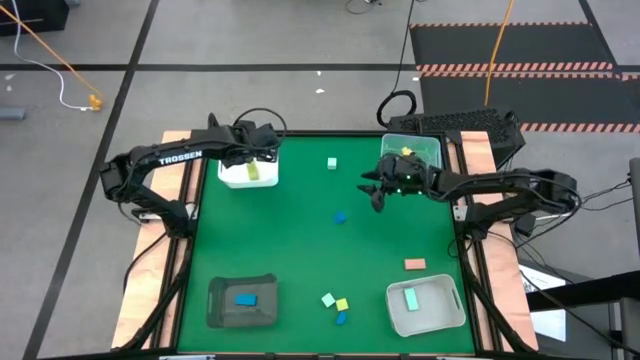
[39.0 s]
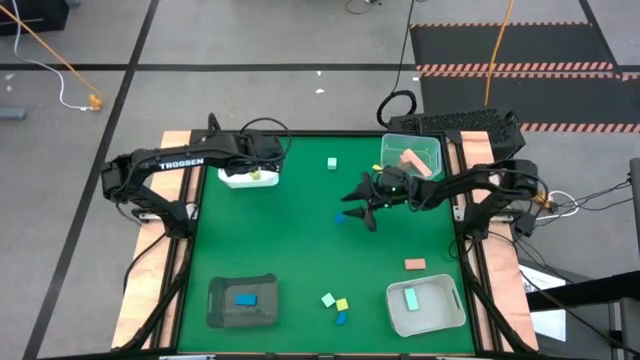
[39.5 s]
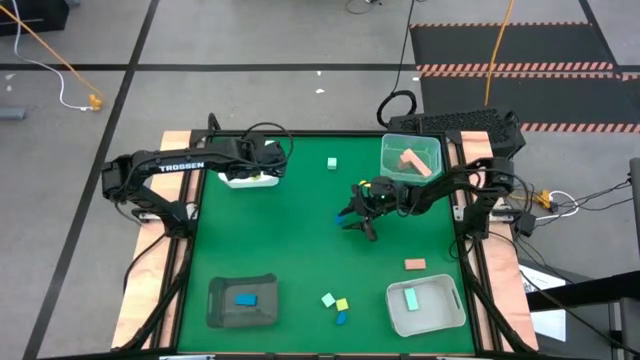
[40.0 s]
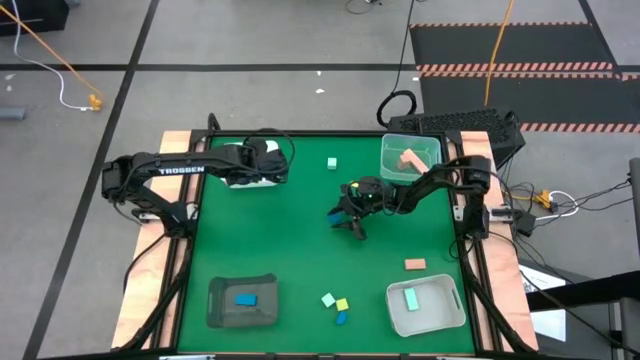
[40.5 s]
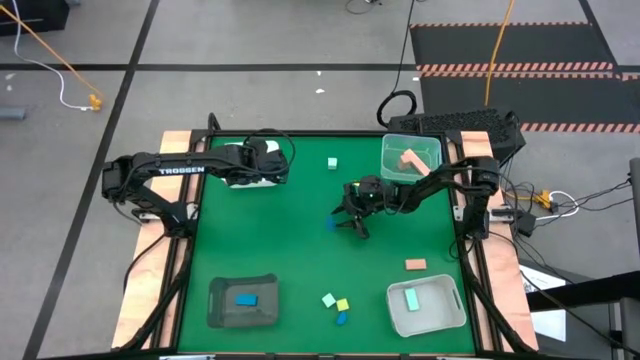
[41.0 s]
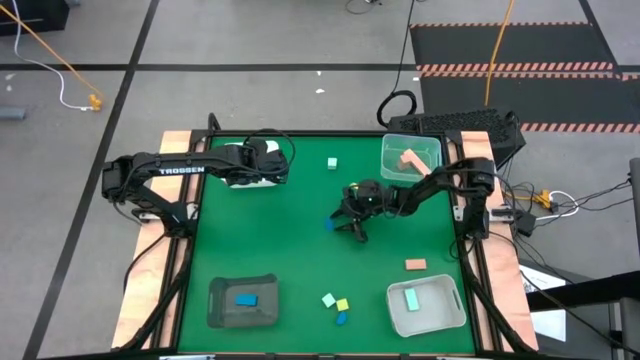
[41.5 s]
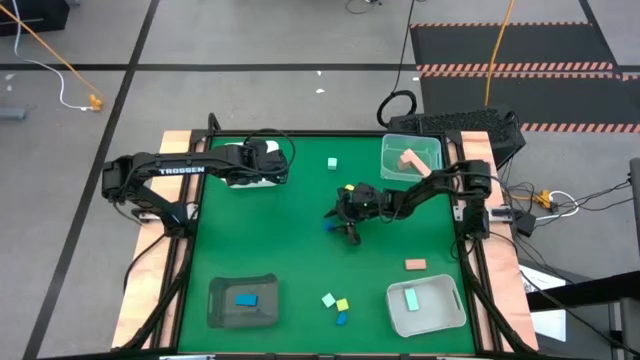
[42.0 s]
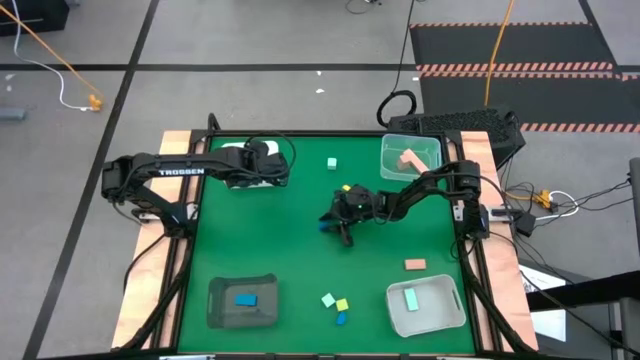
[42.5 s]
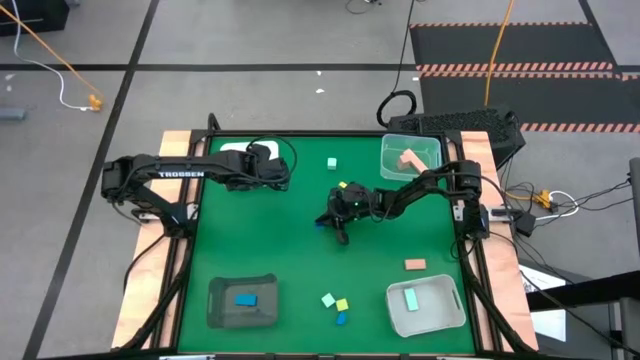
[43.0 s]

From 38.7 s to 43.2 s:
Task: Sort & place blocks by color
Put the top blue block into the black bin

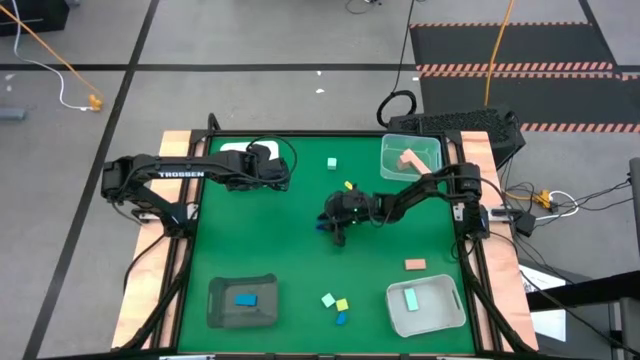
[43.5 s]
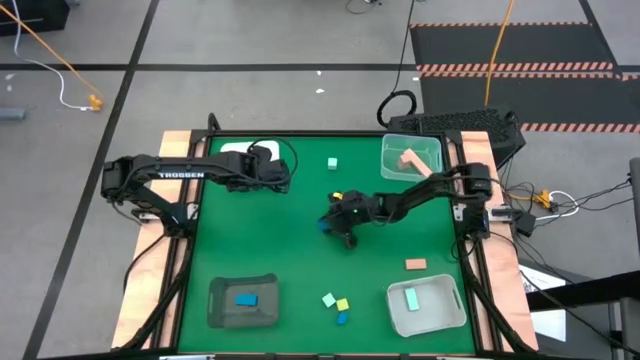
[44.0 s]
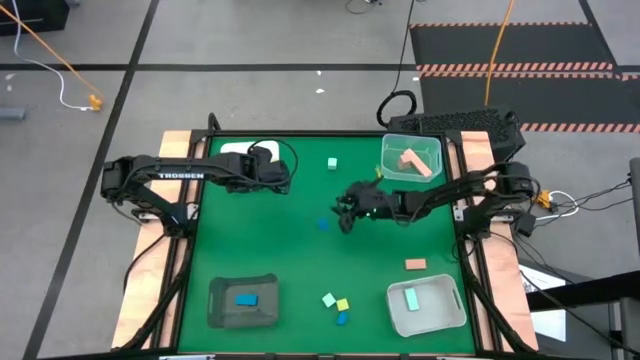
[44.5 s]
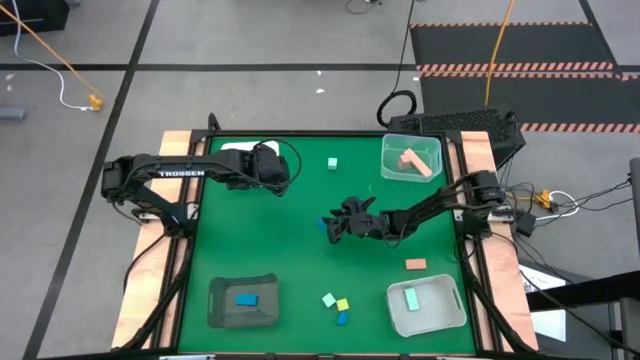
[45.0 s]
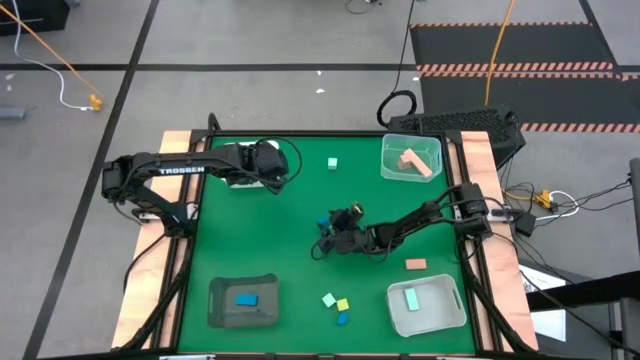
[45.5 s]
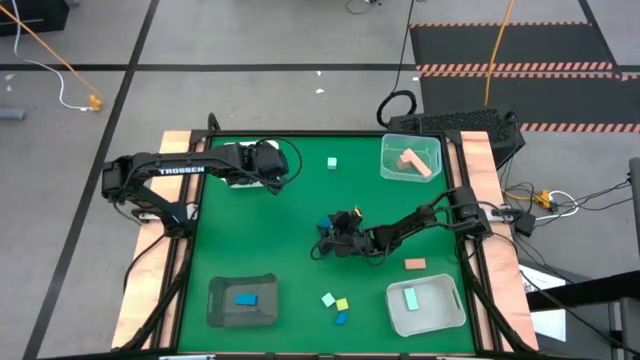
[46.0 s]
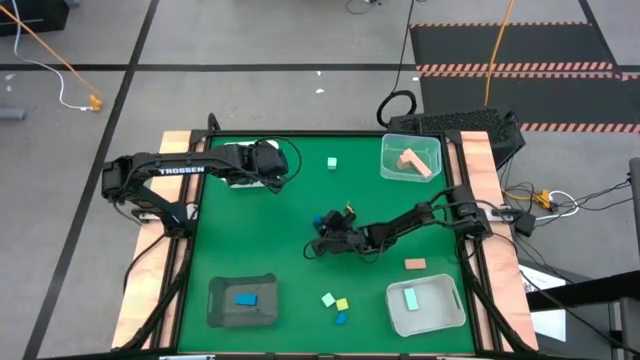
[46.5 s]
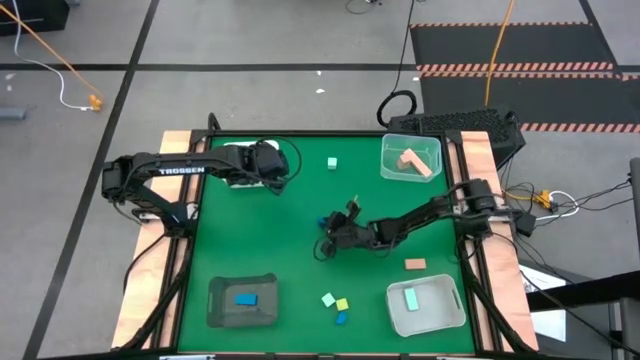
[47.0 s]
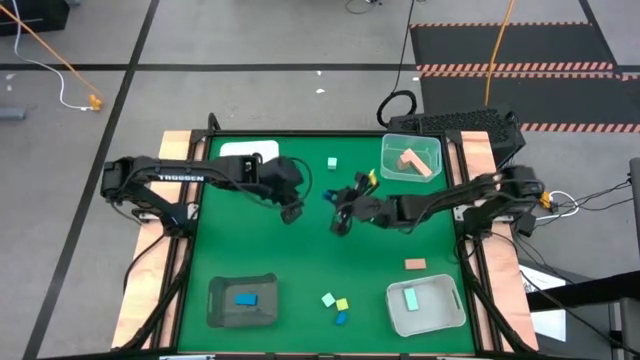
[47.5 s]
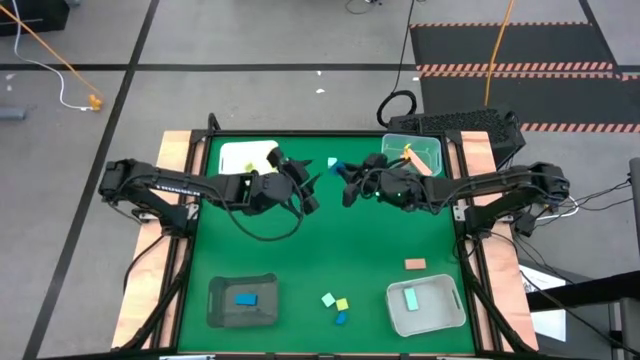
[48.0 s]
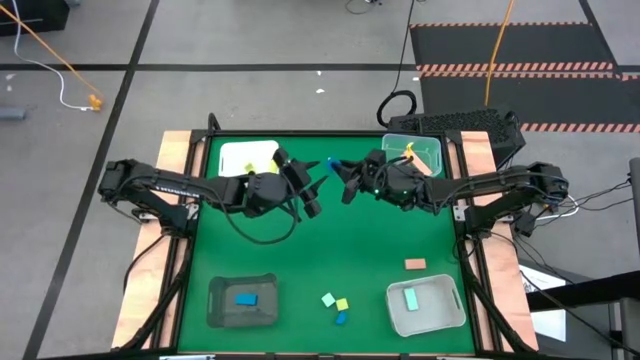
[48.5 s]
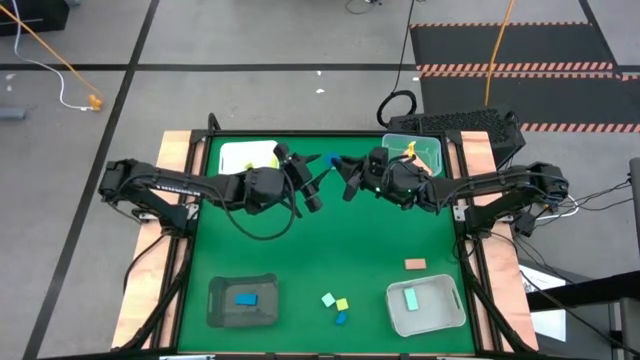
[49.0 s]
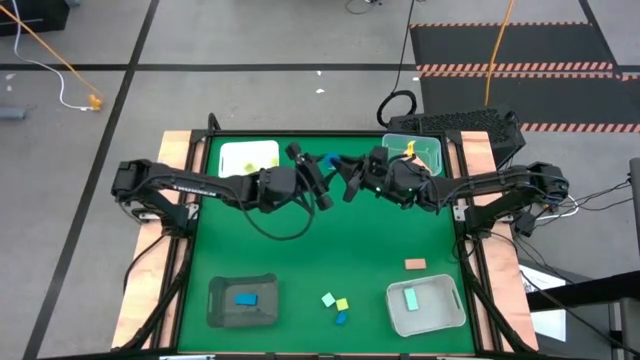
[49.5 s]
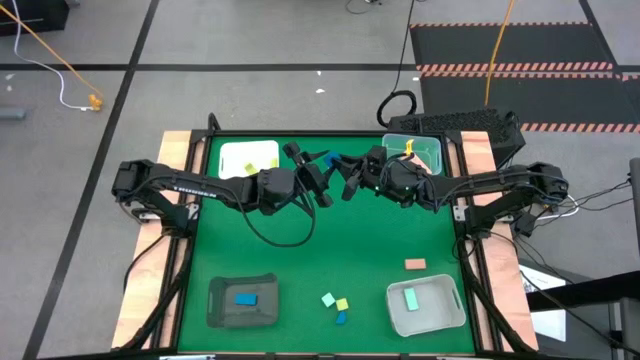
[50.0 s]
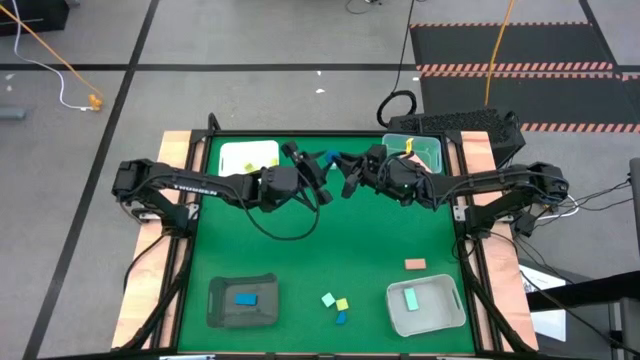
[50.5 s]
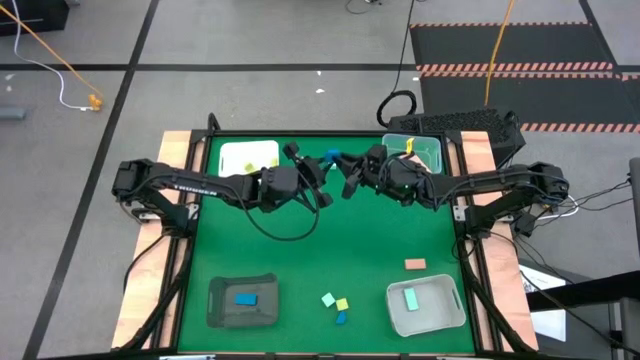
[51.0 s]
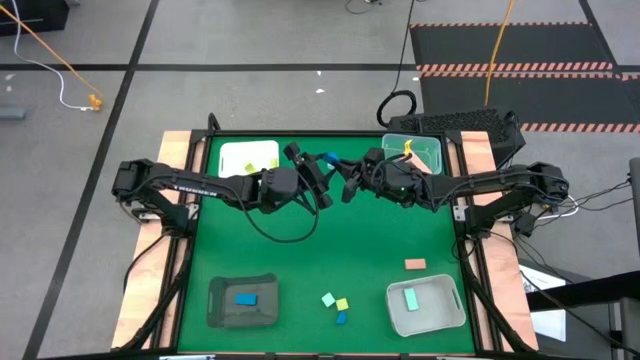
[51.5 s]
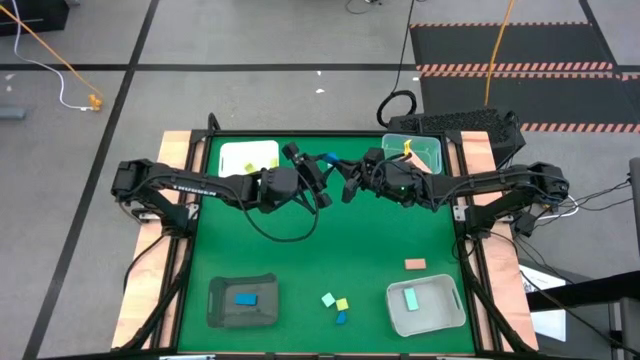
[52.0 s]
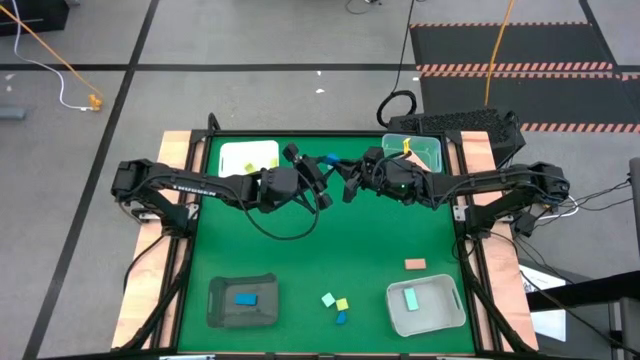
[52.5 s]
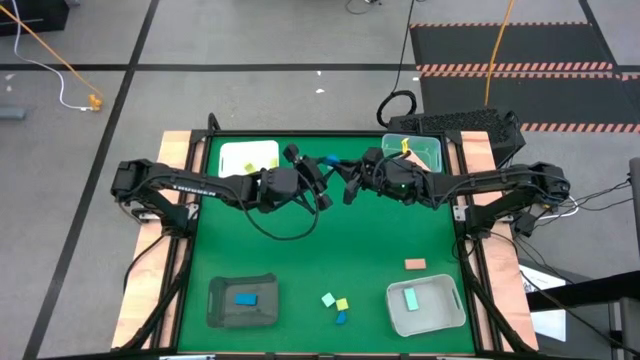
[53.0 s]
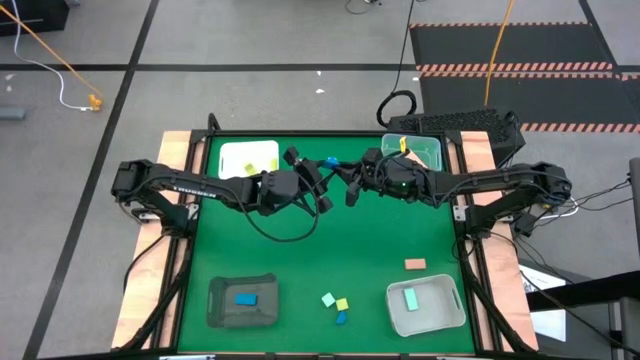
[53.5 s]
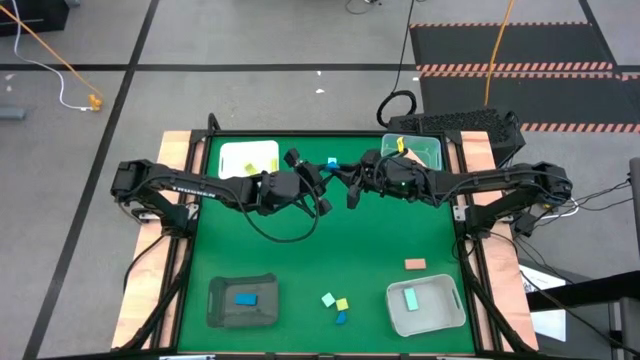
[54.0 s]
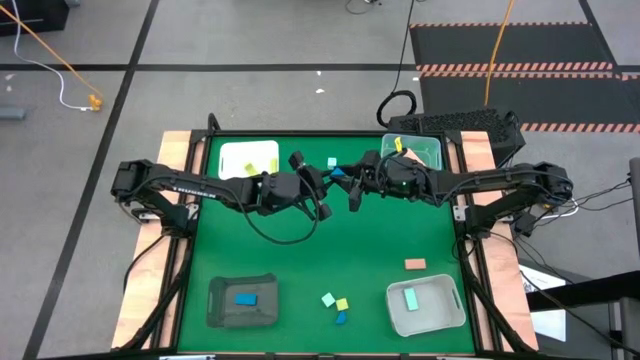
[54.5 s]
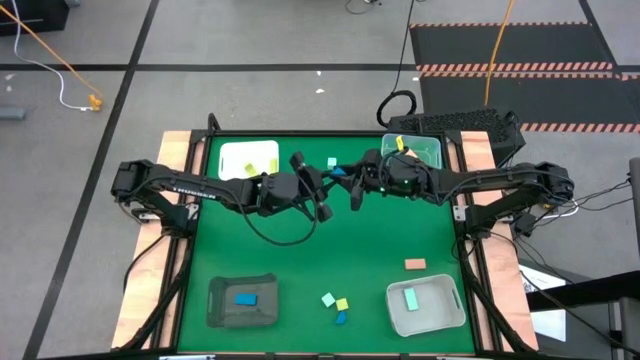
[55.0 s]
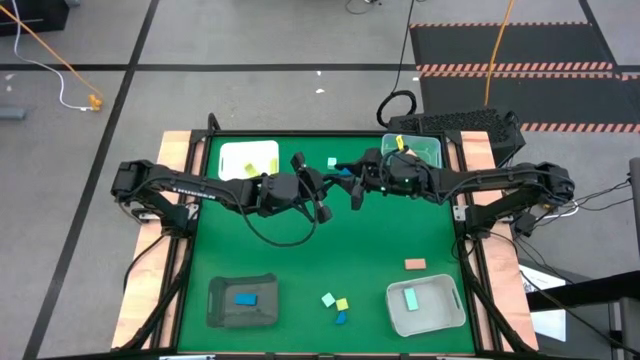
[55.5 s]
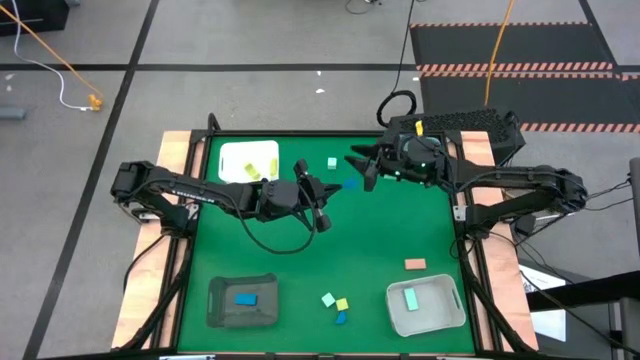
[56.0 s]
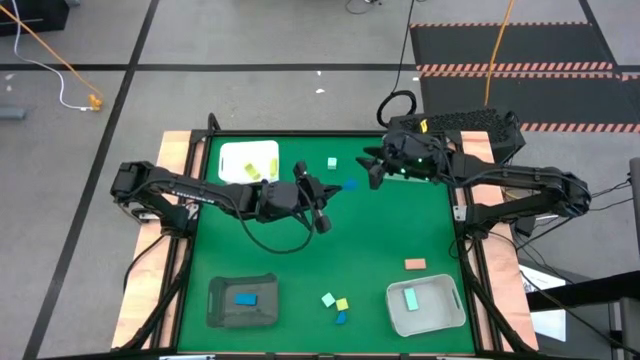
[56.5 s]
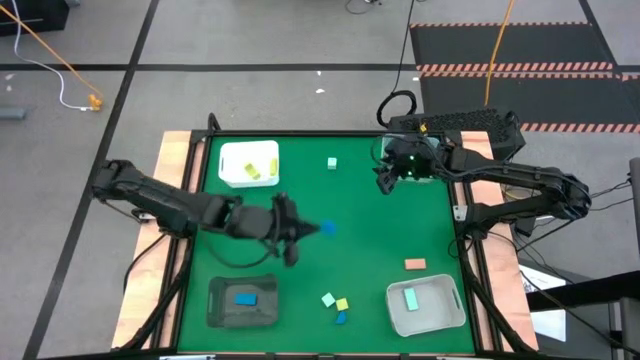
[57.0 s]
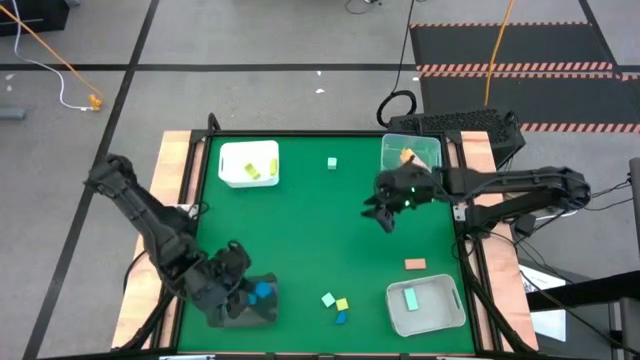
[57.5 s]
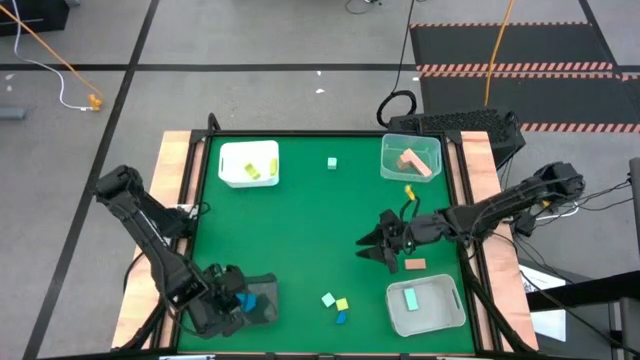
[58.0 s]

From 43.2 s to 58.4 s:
Put the top blue block into the black bin

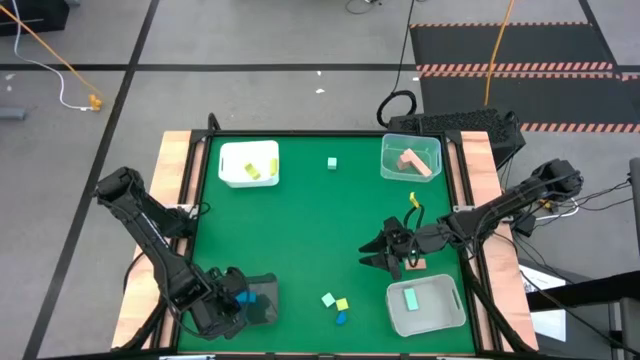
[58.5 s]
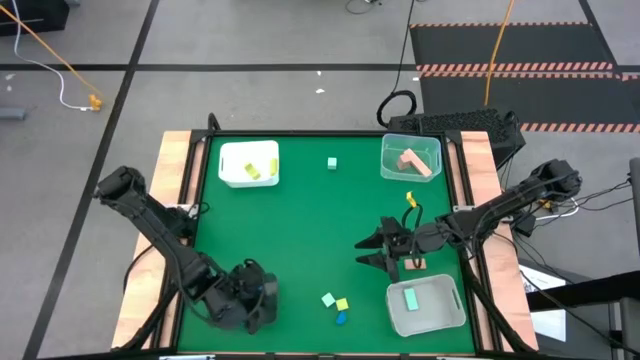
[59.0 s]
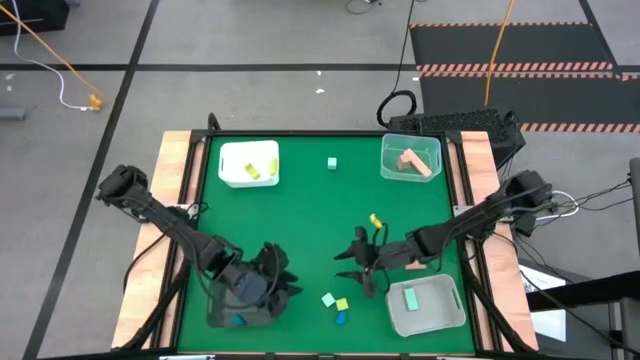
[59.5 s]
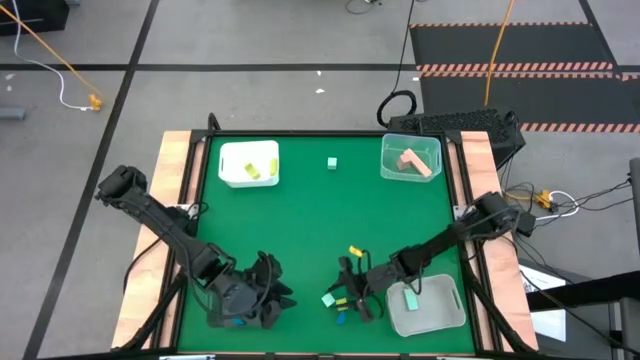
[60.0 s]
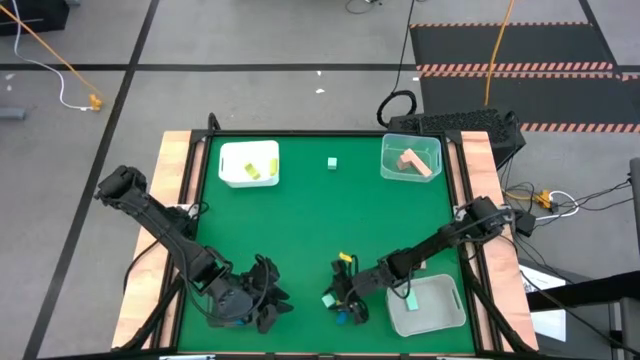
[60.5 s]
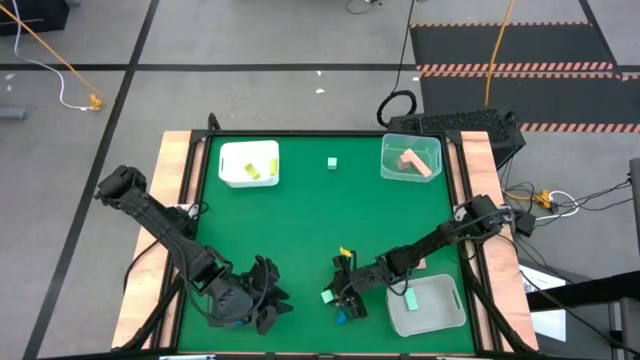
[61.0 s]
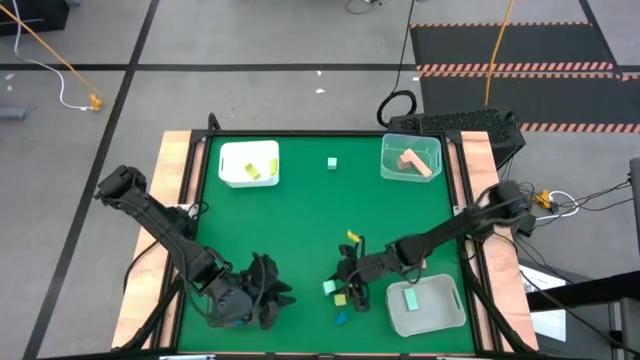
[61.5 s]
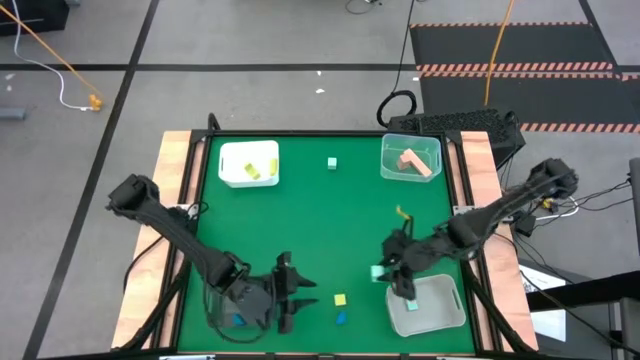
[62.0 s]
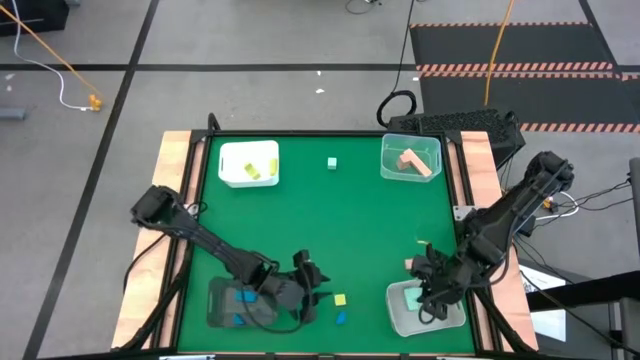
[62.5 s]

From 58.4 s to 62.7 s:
Put the bottom light blue block into the gray bin
